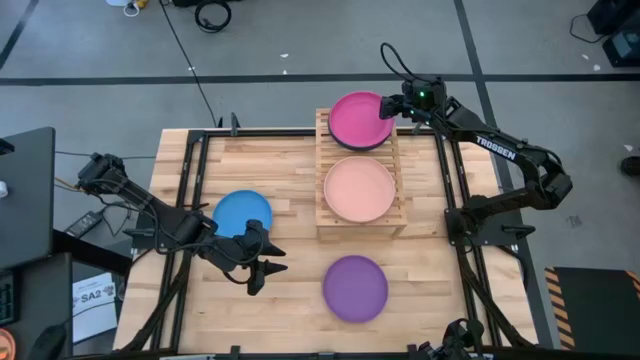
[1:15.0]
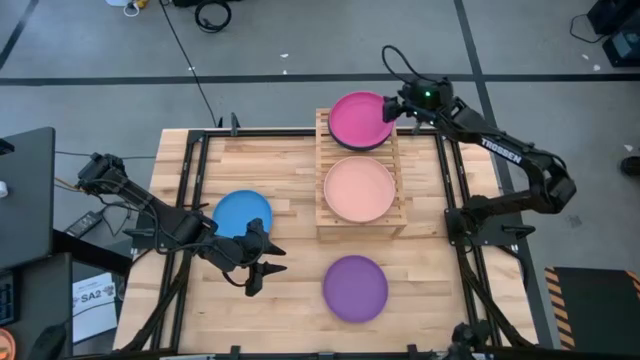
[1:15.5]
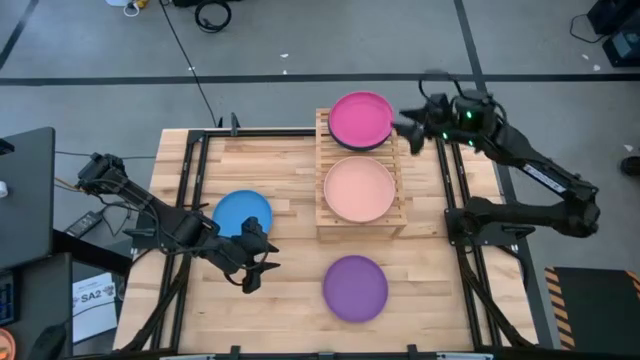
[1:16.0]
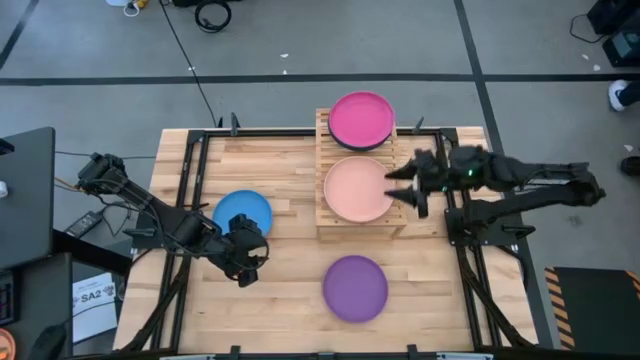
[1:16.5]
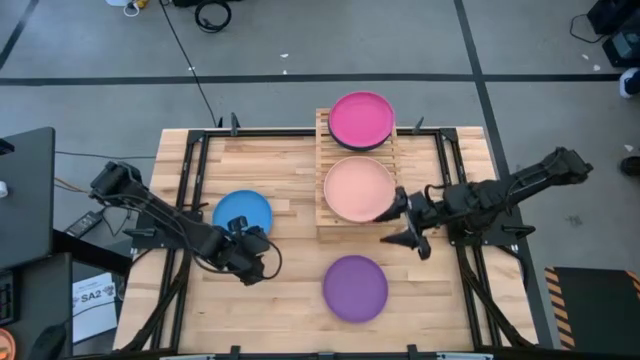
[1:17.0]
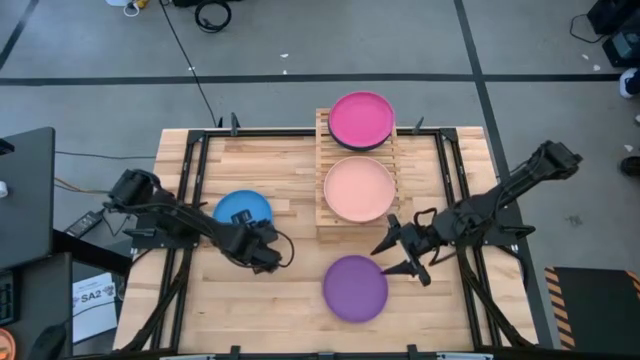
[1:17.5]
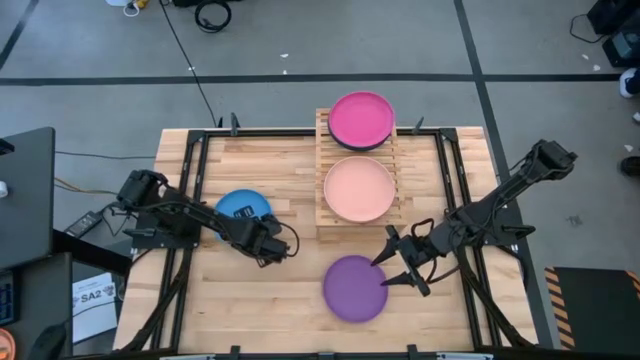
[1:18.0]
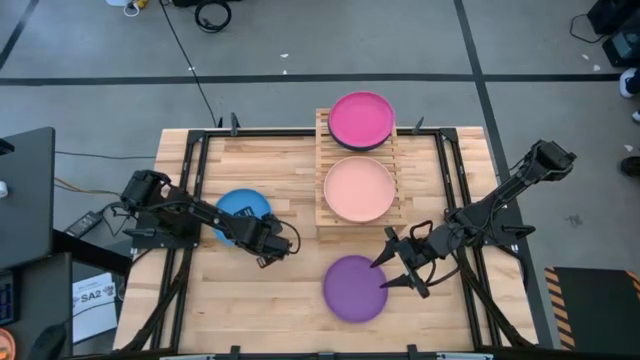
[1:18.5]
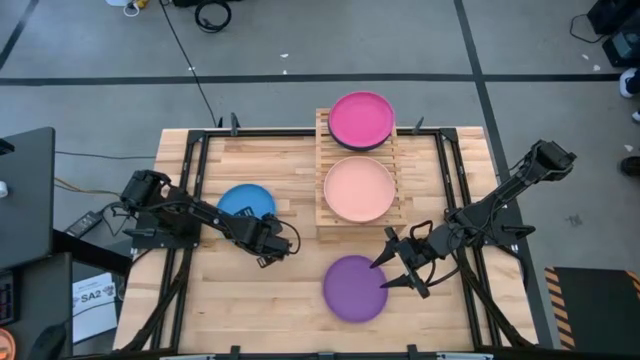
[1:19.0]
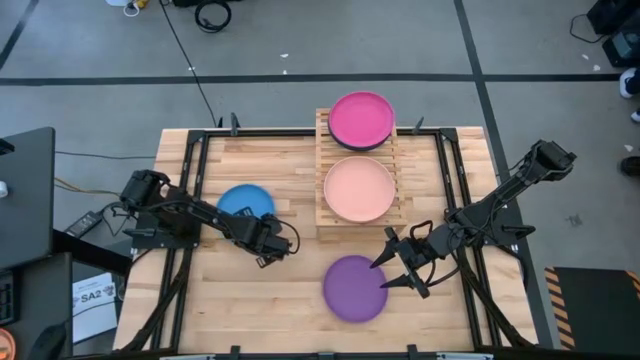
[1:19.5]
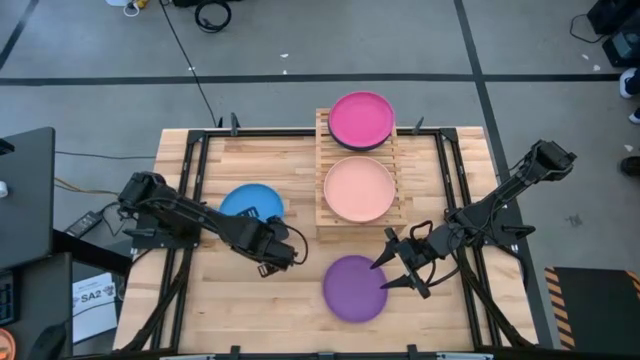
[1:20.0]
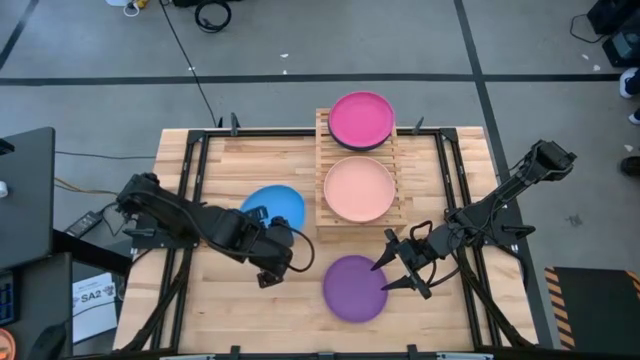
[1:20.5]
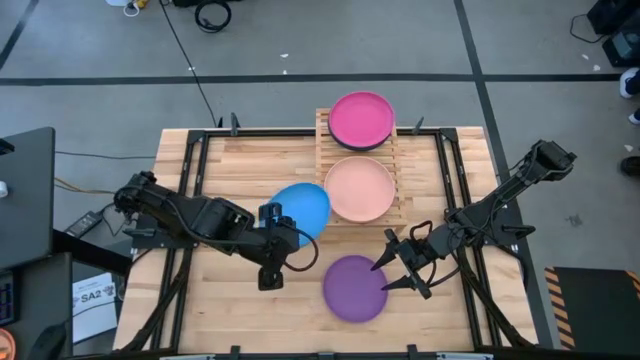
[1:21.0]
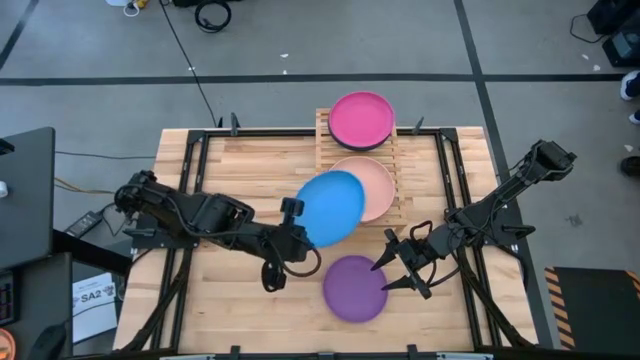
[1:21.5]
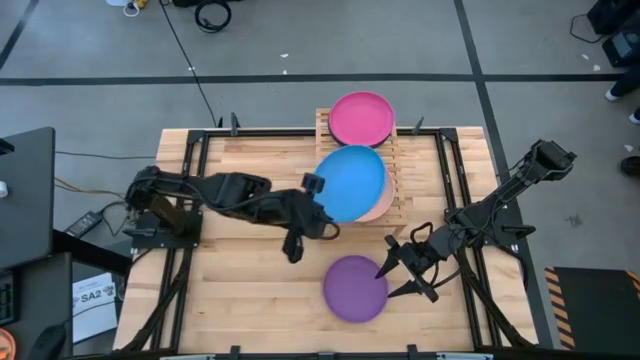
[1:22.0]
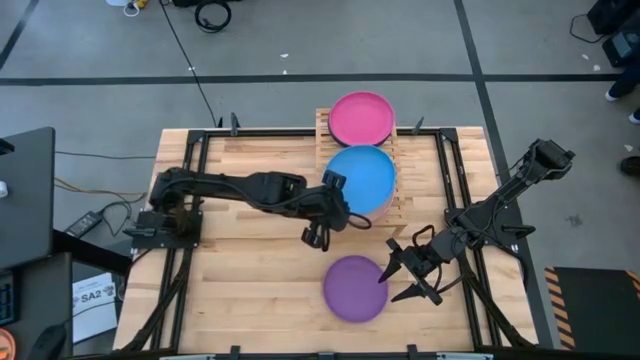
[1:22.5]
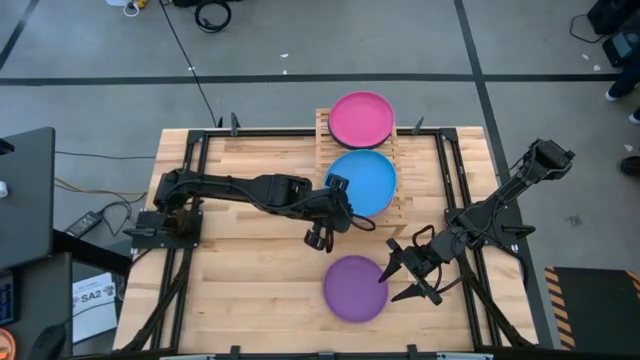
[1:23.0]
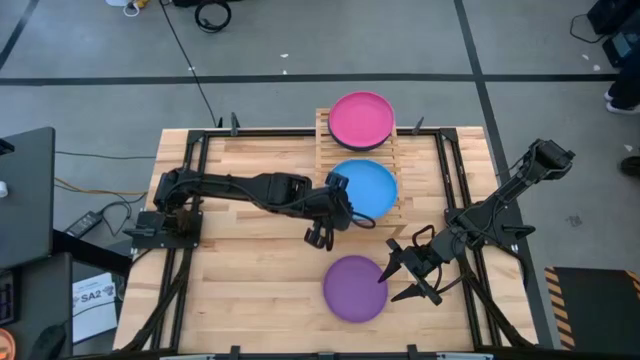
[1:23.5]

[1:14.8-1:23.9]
Task: Place and stack plates onto a shelf
Stack the blue plate on top of the light pink plate

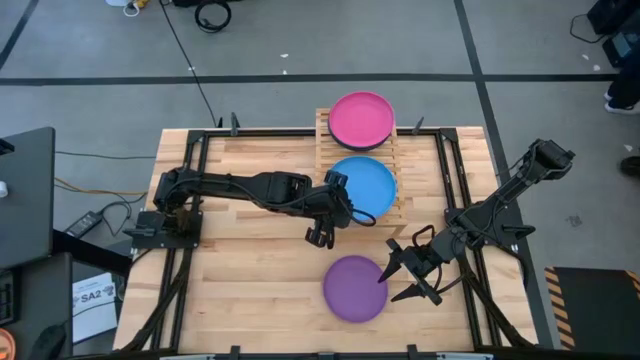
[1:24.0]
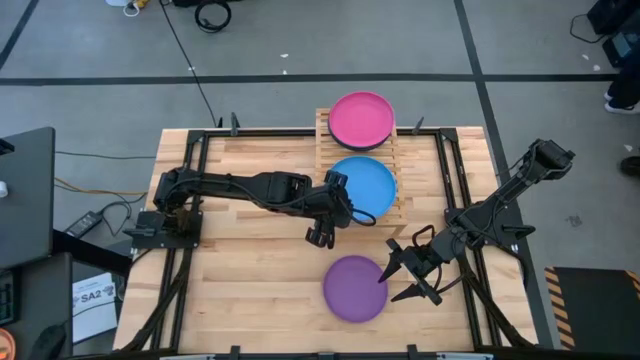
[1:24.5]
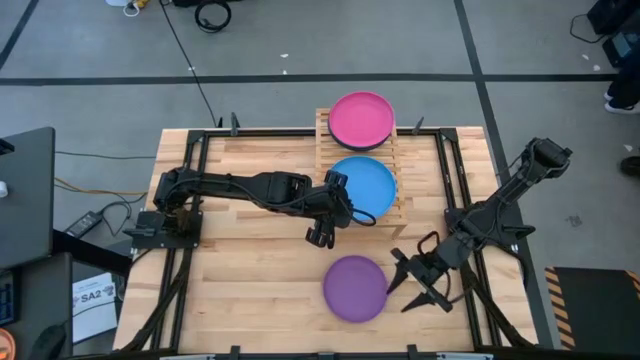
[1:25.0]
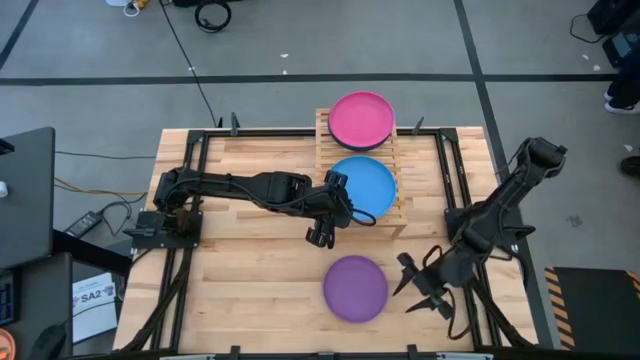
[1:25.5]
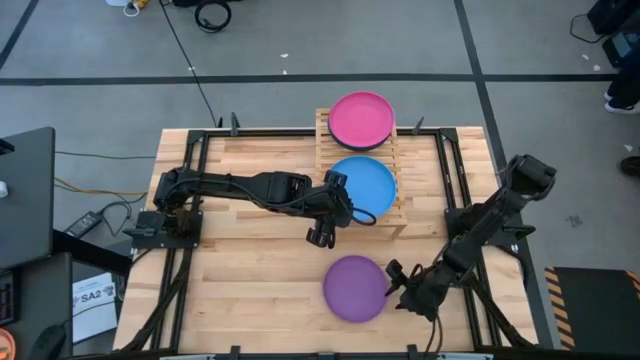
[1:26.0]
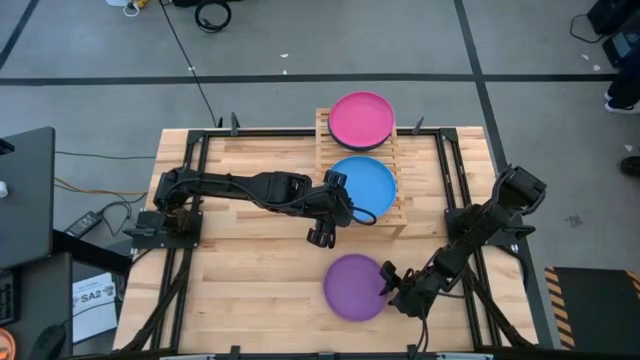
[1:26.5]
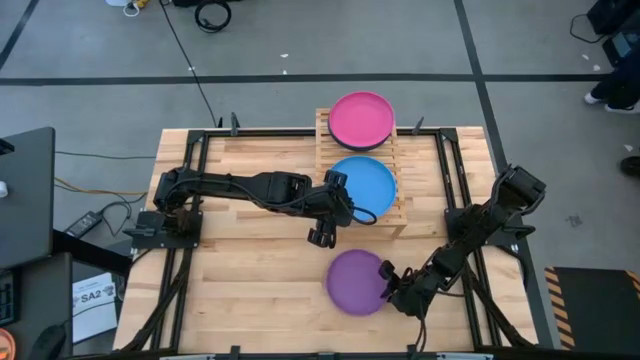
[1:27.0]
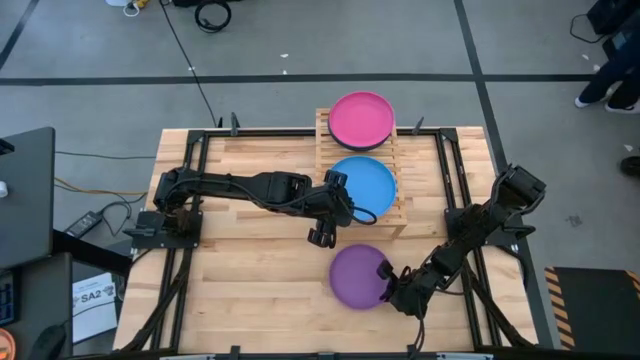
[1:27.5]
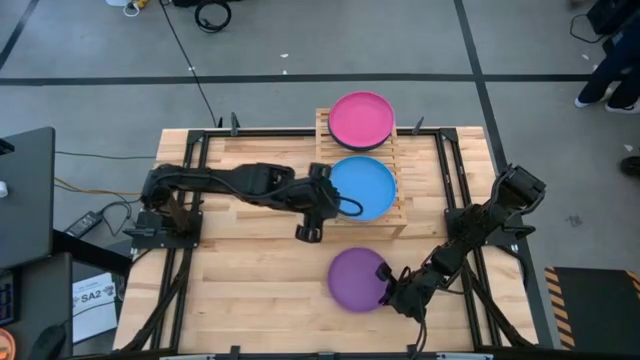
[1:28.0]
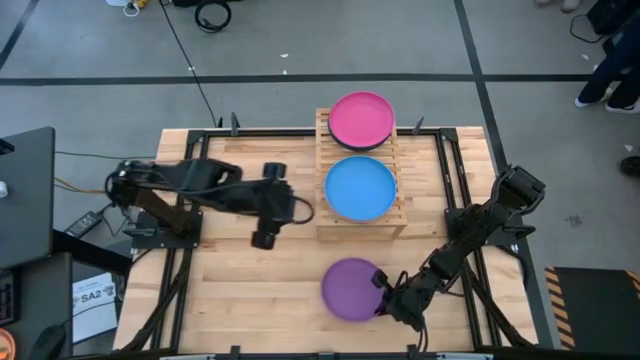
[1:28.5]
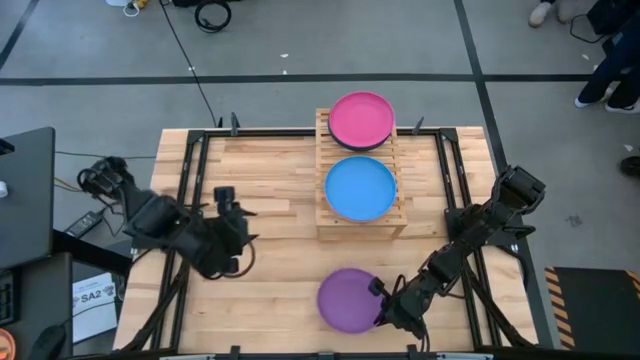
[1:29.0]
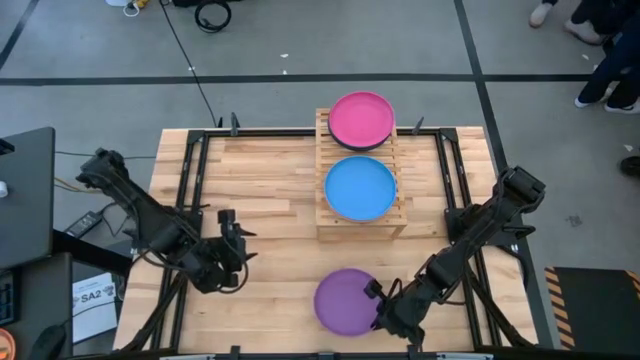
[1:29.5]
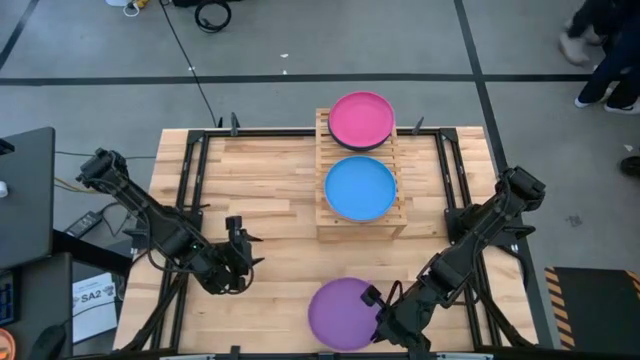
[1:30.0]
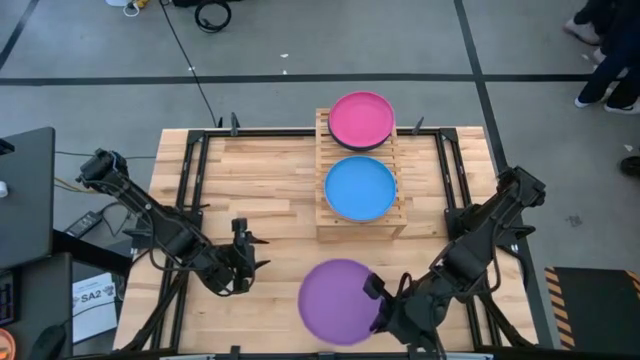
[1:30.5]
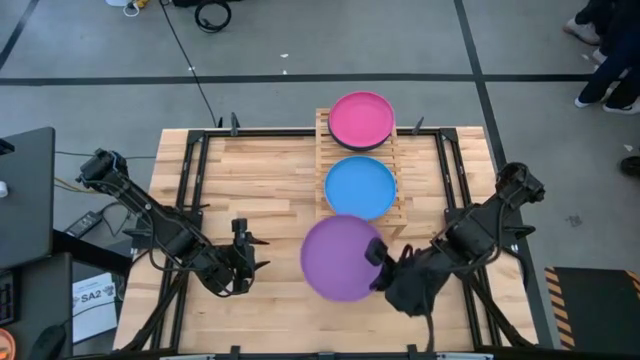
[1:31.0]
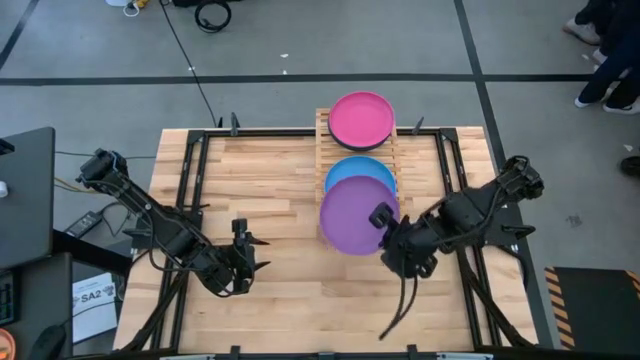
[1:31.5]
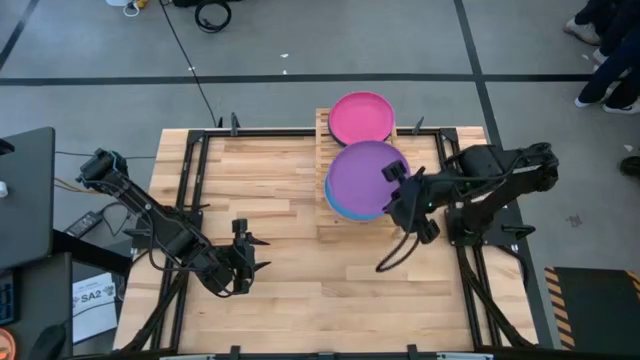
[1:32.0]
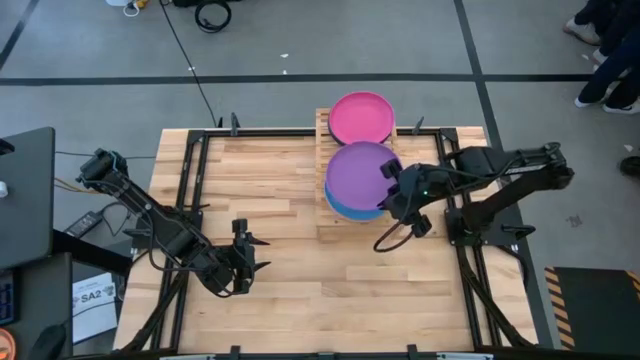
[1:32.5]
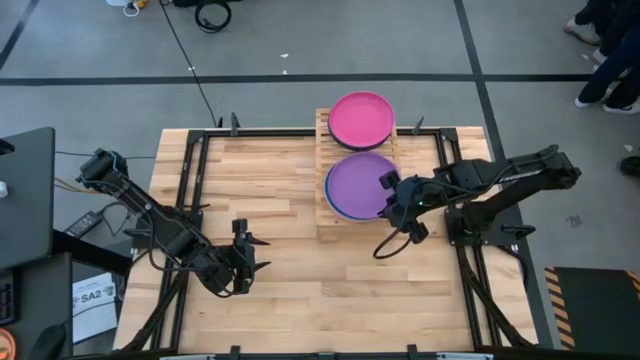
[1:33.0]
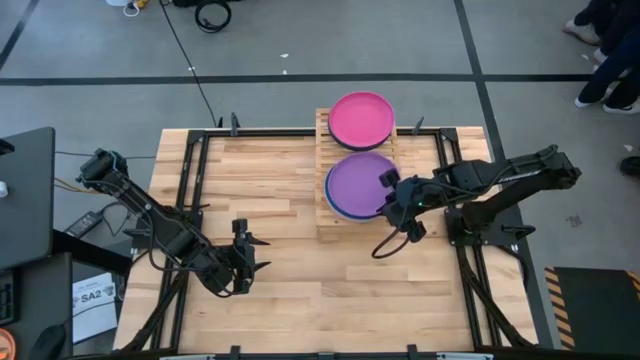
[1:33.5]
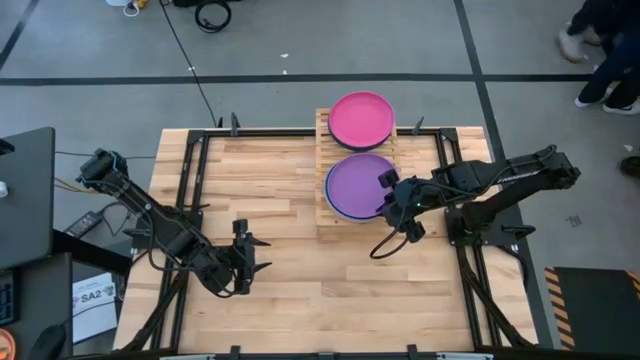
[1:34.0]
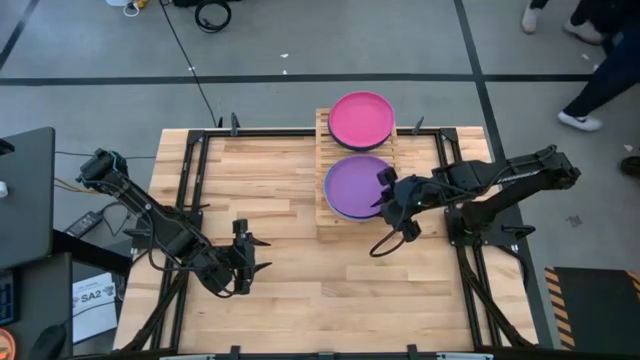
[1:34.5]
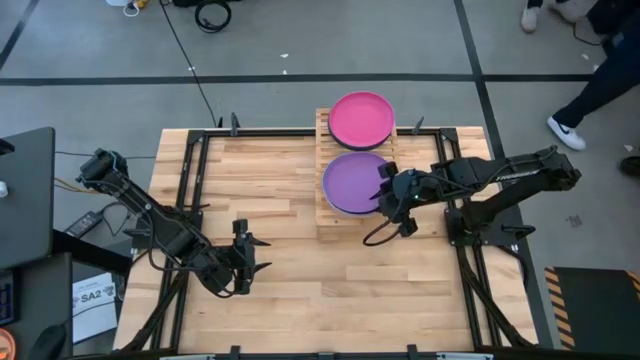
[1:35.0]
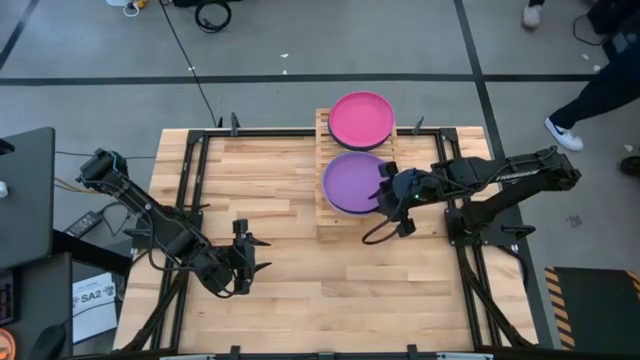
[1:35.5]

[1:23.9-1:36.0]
Stack the violet plate on top of the blue plate

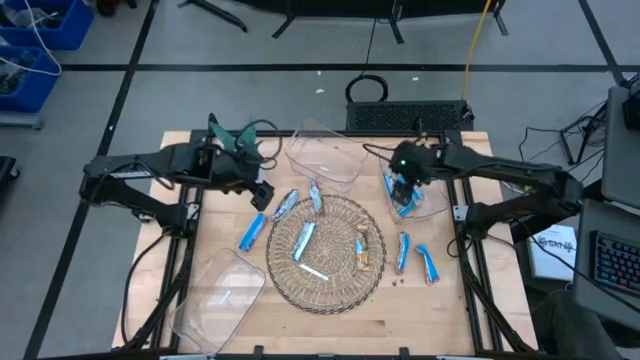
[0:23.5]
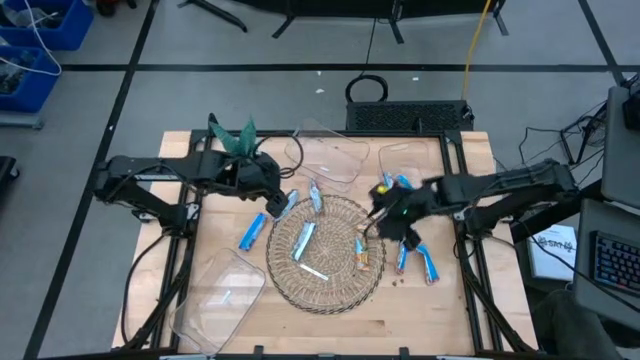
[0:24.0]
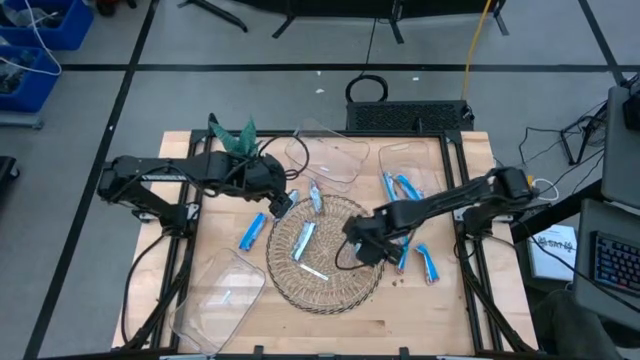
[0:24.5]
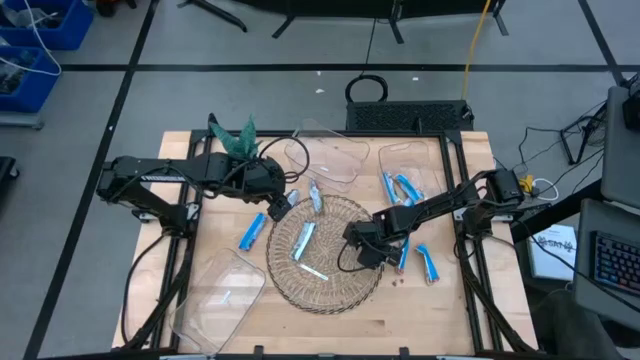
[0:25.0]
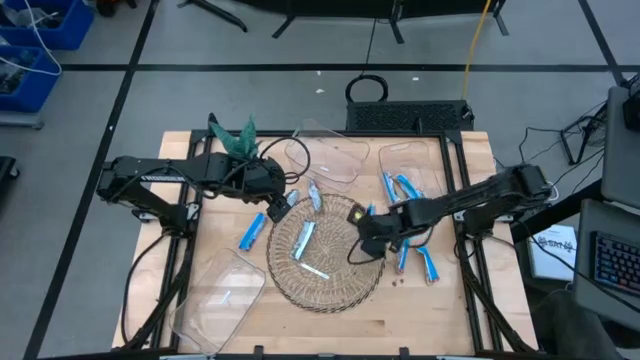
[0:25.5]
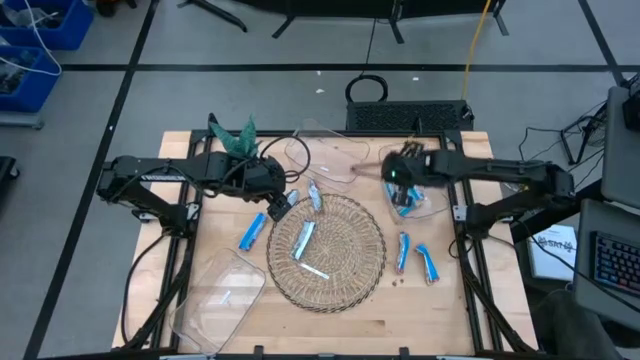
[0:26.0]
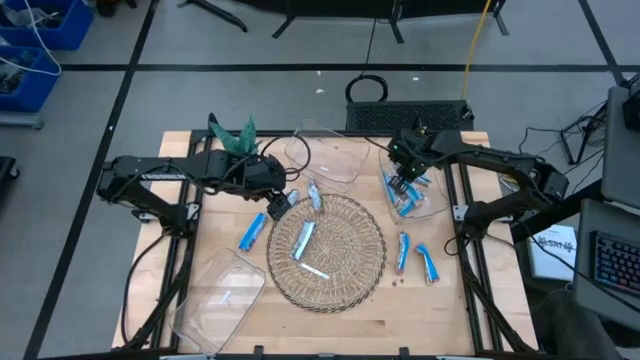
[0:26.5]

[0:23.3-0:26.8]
Task: Pick and place Granola Bars by type
Put the yellow granola bar into the top right transparent bin
